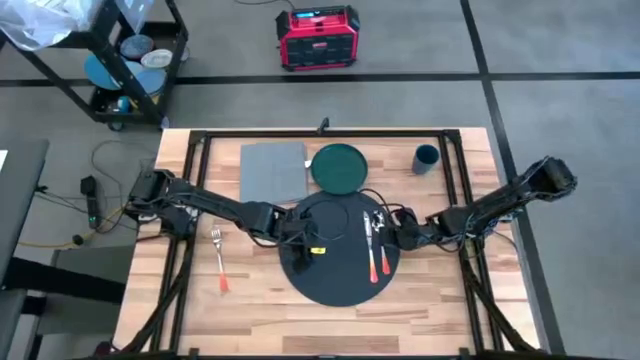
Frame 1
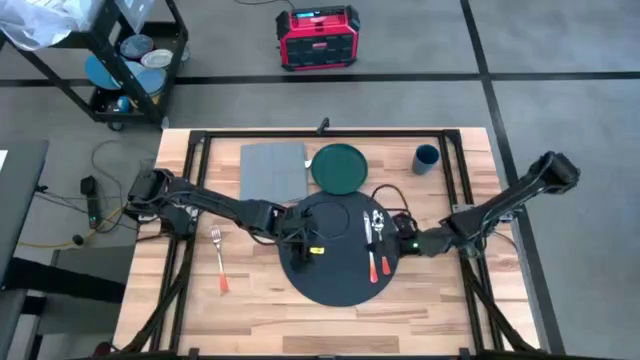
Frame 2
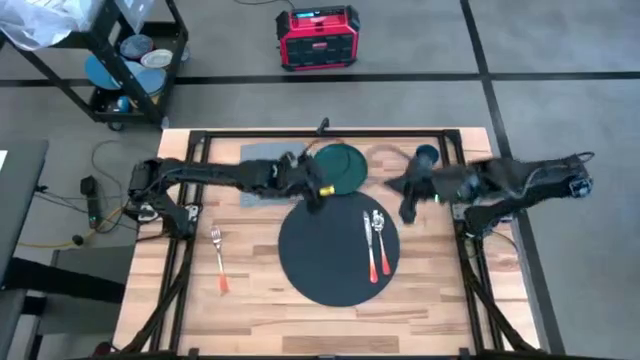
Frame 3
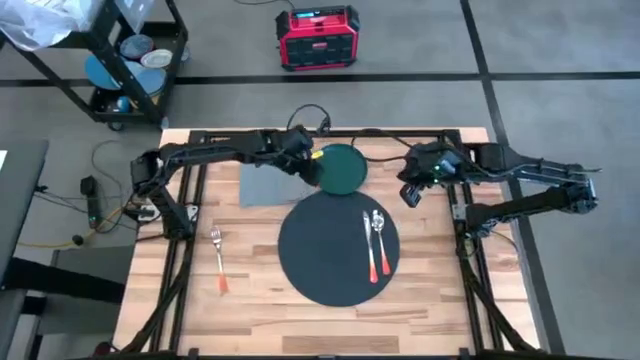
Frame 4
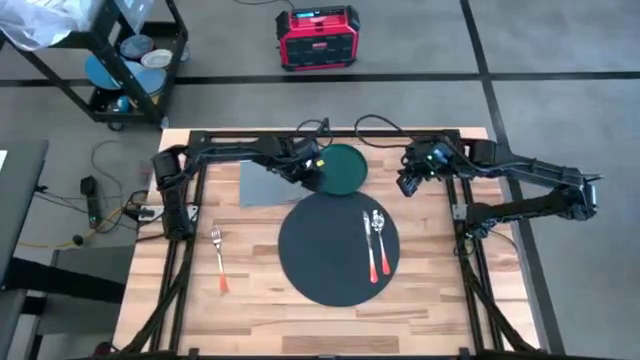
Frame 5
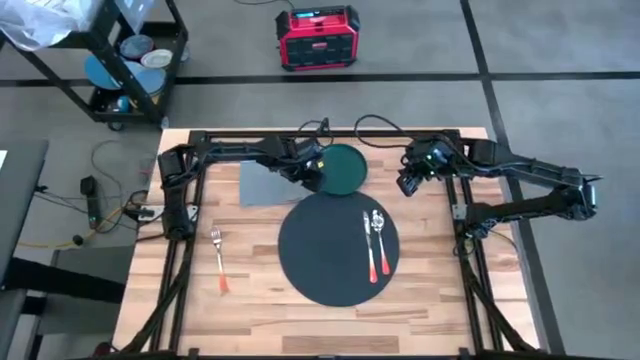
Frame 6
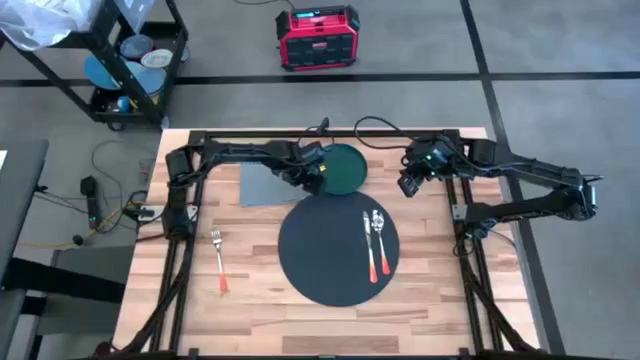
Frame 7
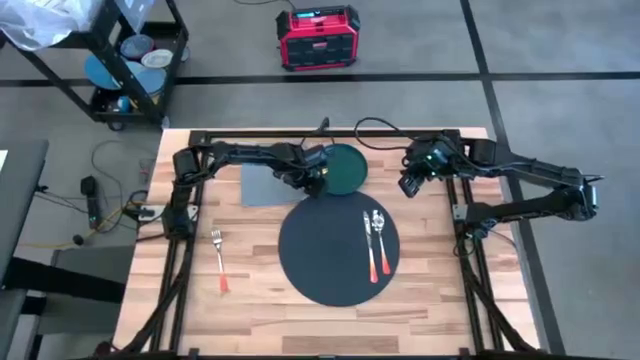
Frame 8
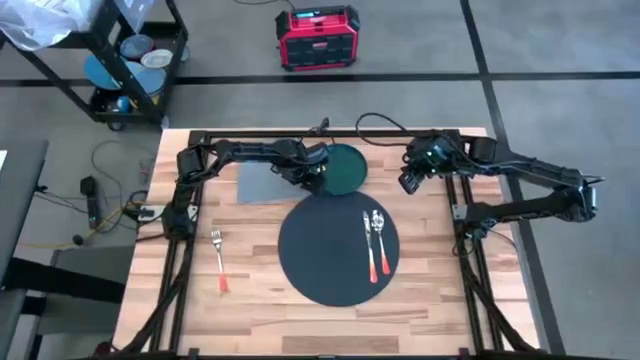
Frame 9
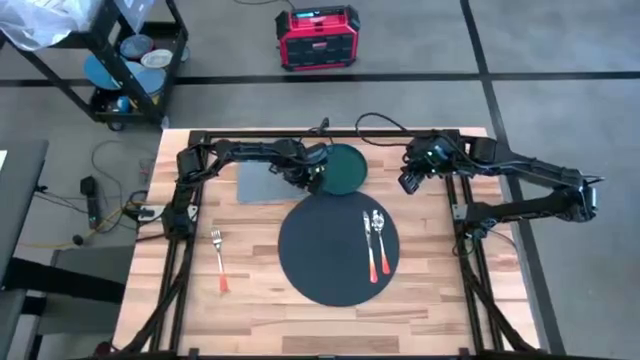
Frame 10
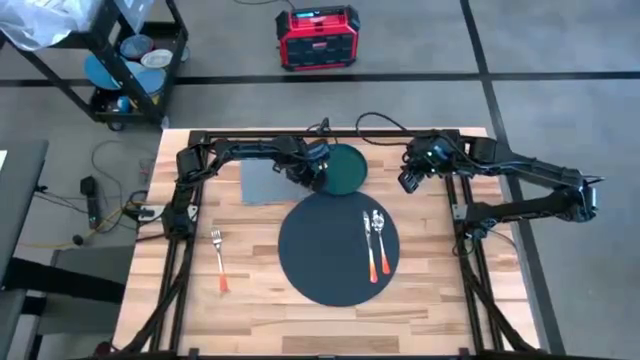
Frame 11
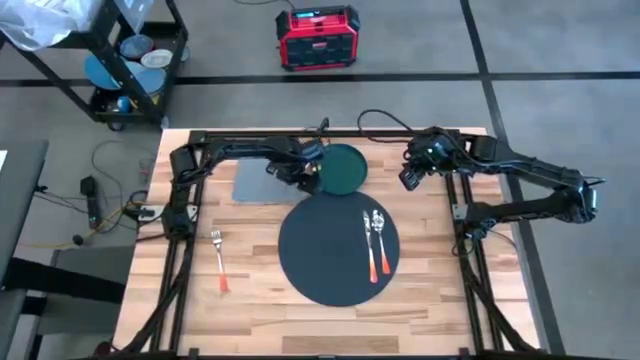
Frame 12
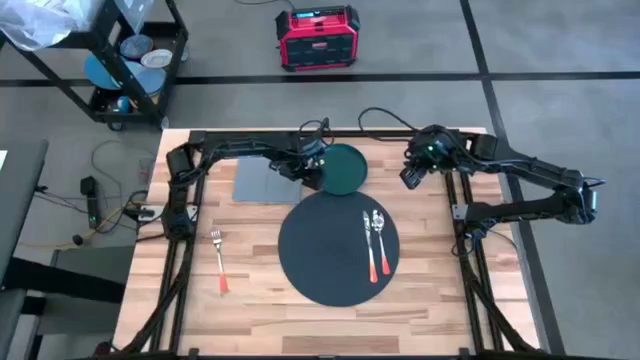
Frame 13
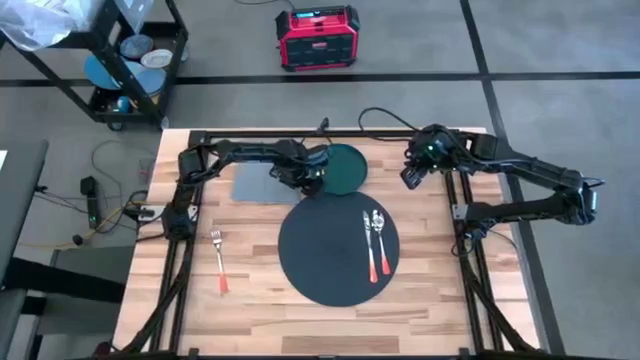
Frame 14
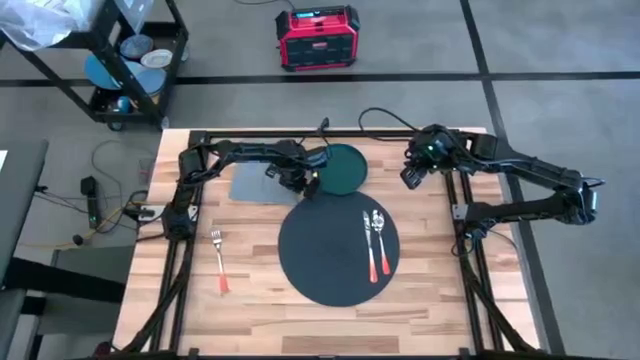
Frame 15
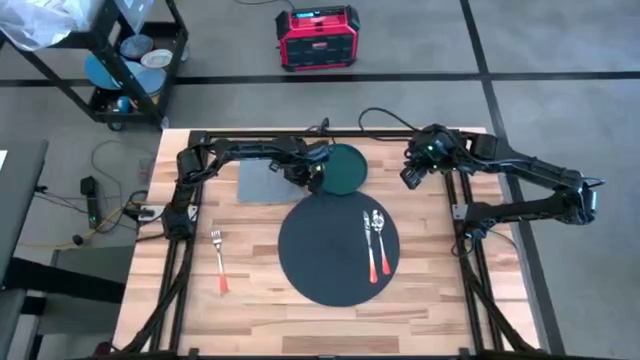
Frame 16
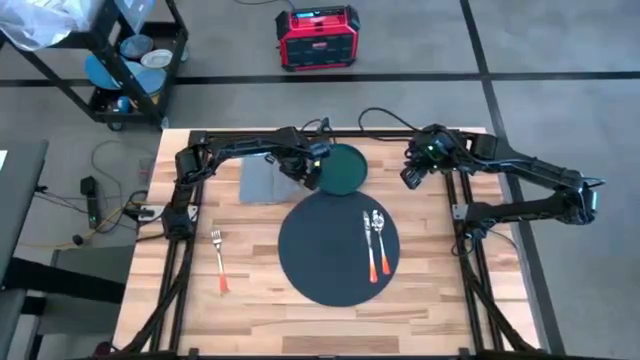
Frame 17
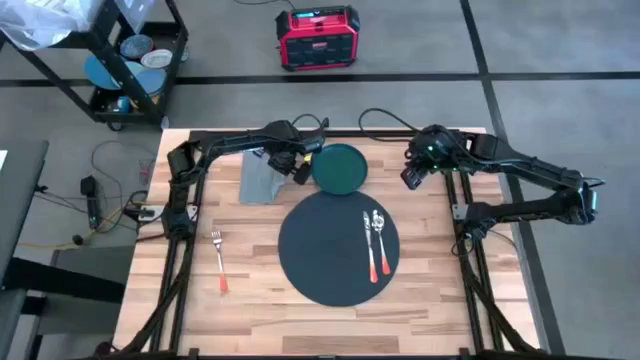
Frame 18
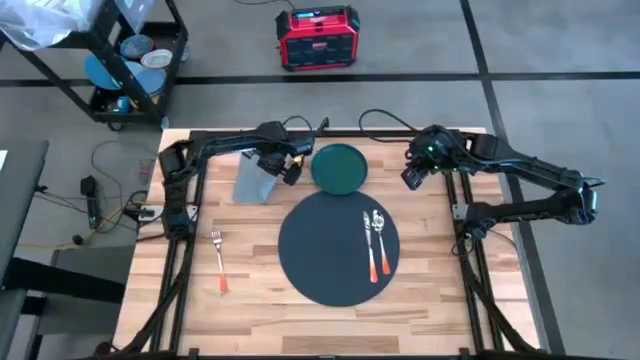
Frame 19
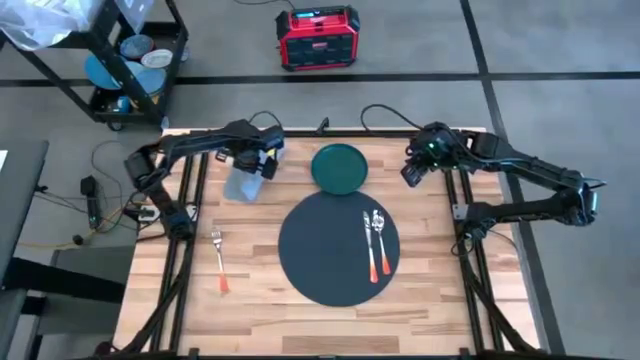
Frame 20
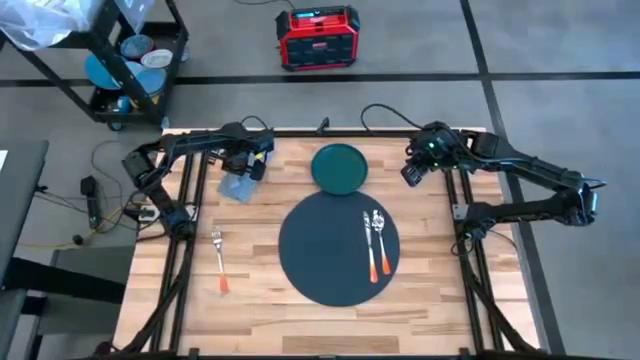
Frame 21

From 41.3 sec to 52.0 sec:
Task: Set table place
Fold the gray table napkin

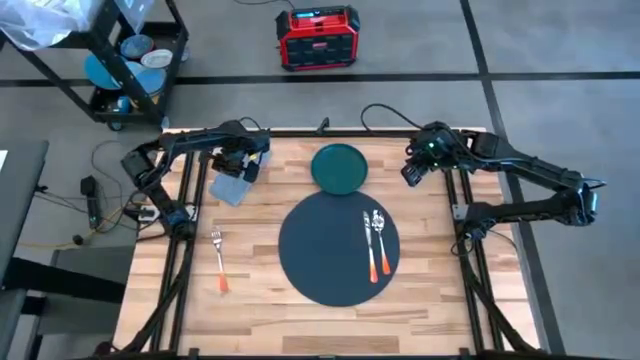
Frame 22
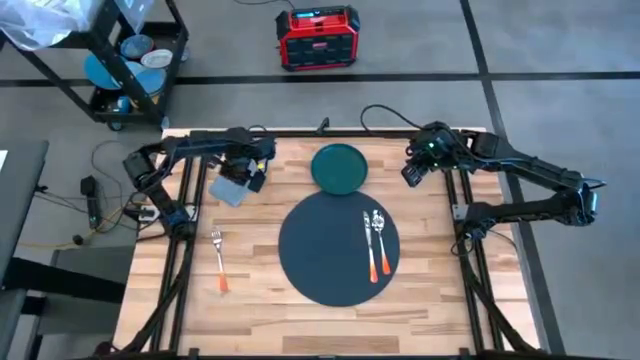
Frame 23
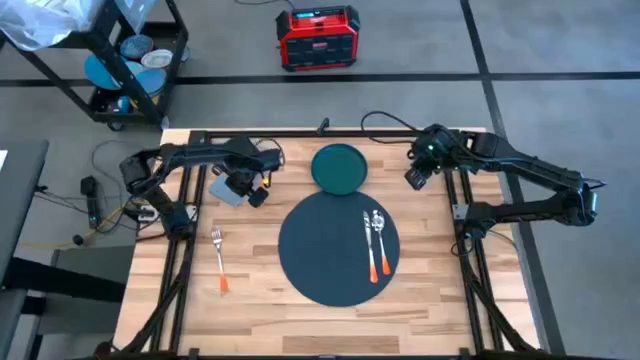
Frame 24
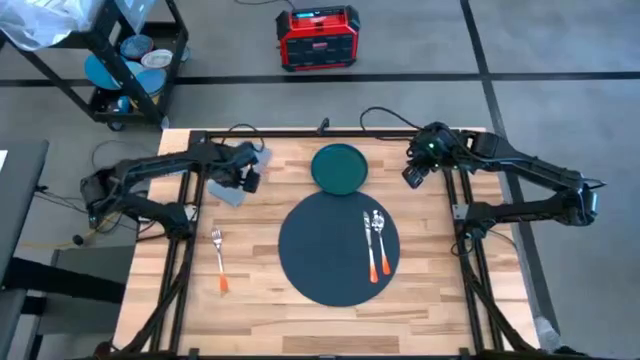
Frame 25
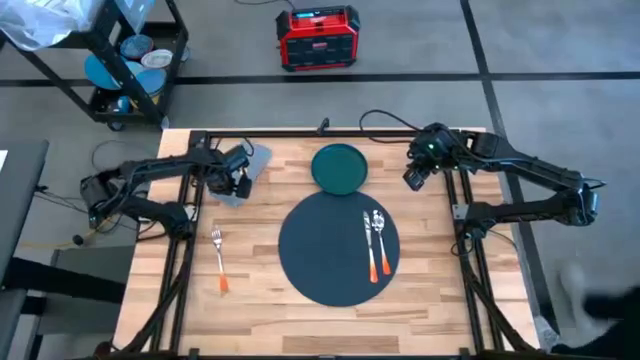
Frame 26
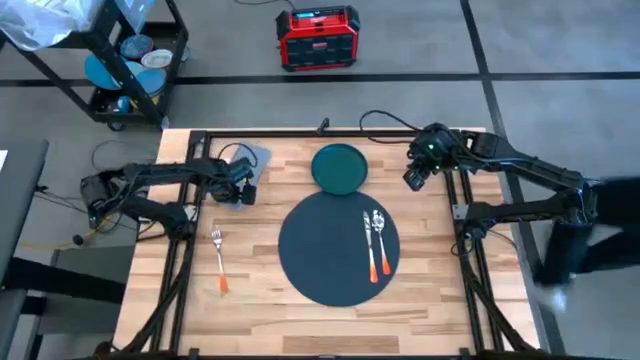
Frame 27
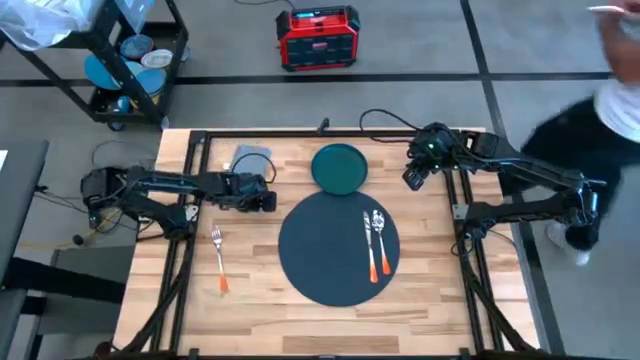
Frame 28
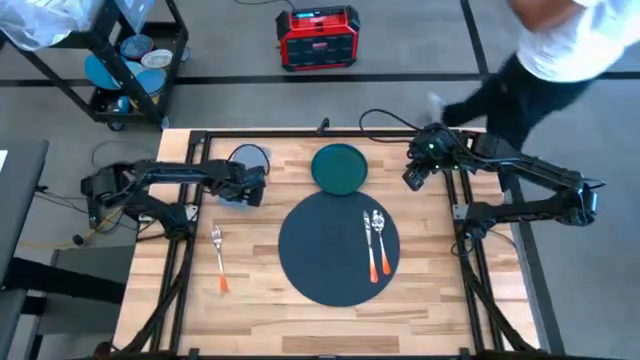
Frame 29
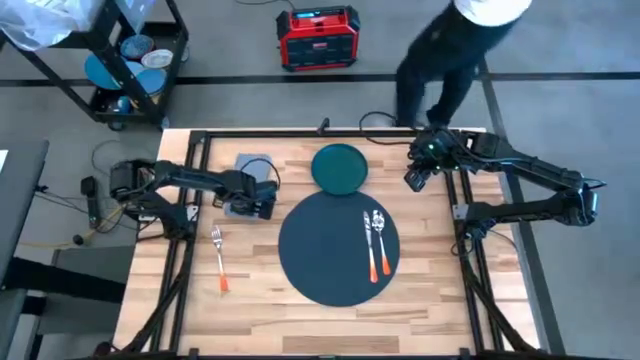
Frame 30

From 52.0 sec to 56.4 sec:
Move the gray table napkin to the top left of the blue placemat

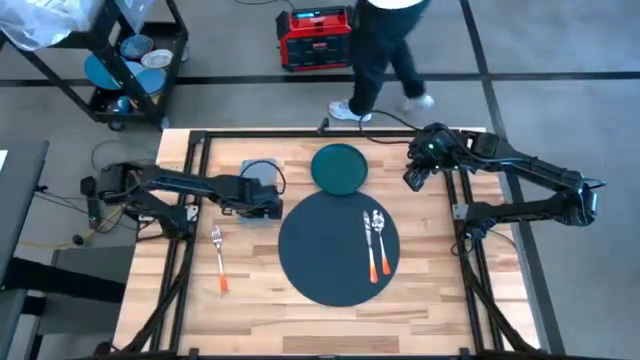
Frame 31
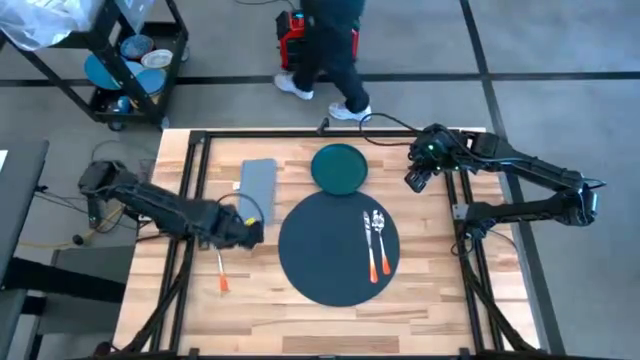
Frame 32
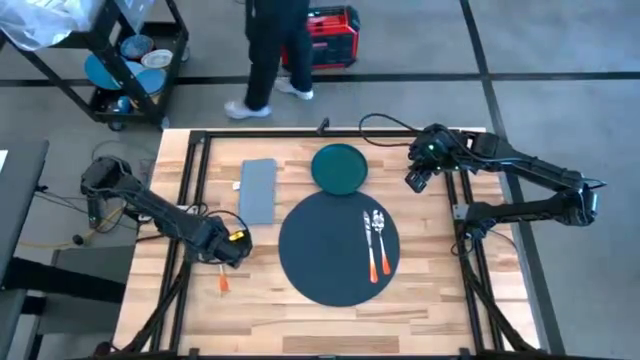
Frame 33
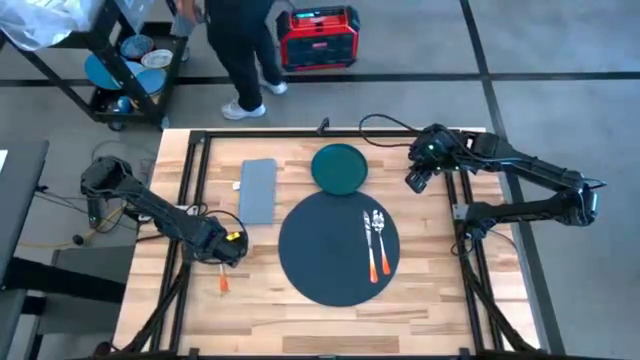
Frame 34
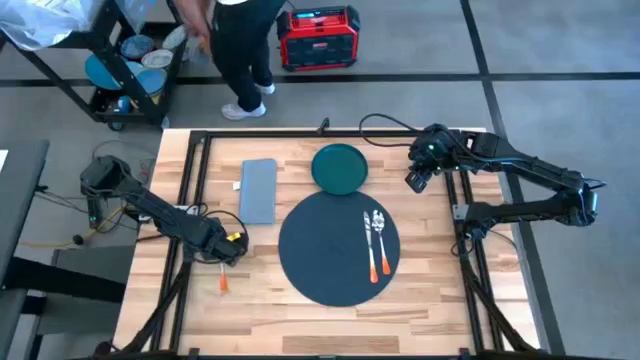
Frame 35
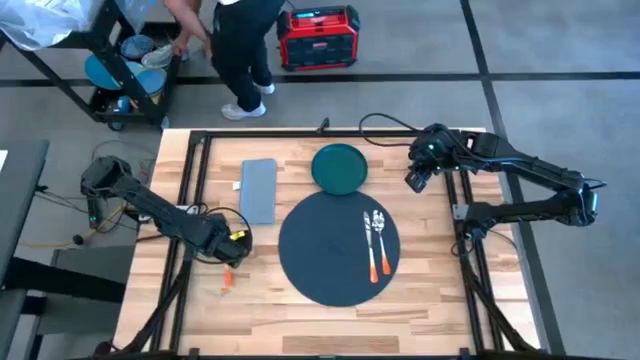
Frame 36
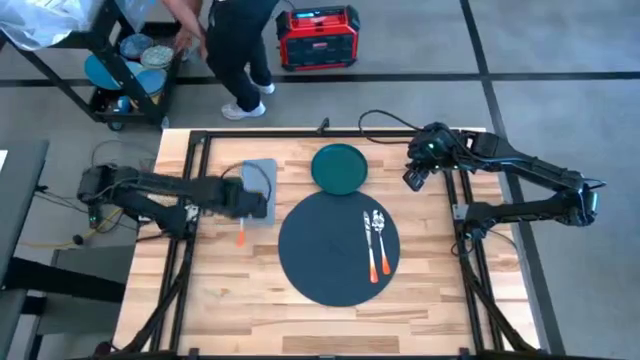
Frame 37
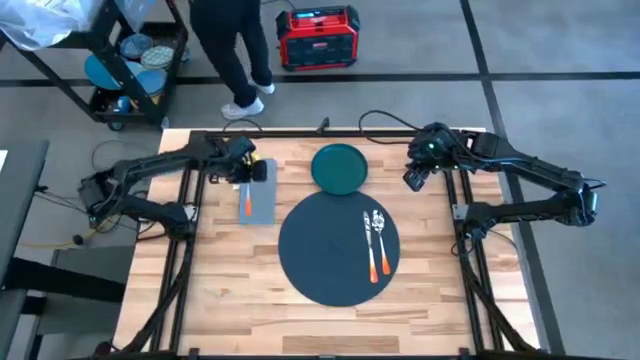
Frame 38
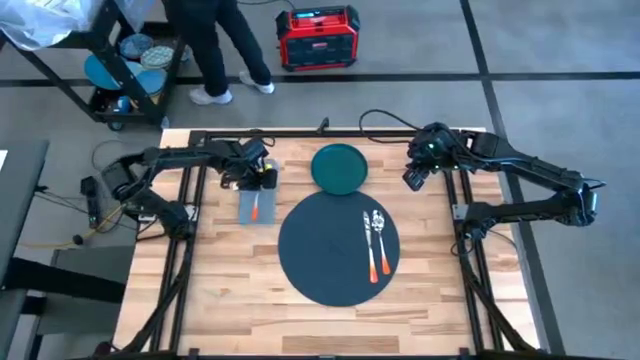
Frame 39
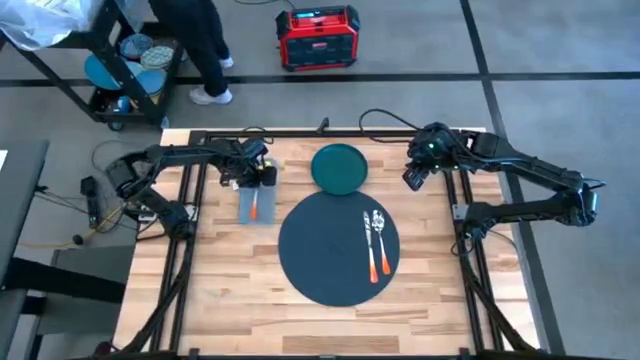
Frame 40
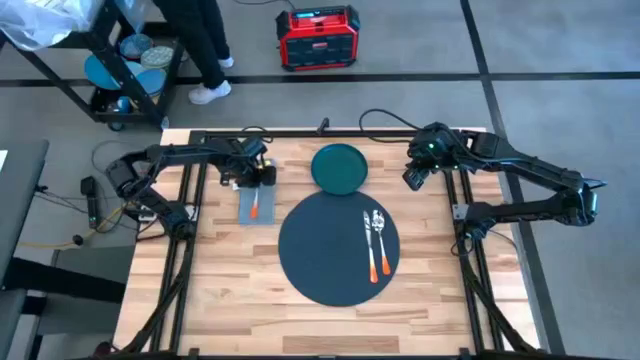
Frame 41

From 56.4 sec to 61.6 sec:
Put the orange fork on top of the gray table napkin
